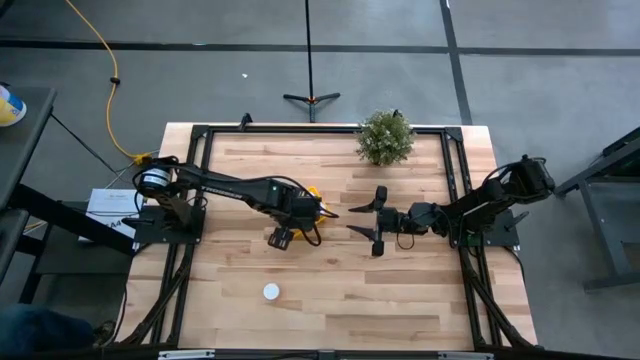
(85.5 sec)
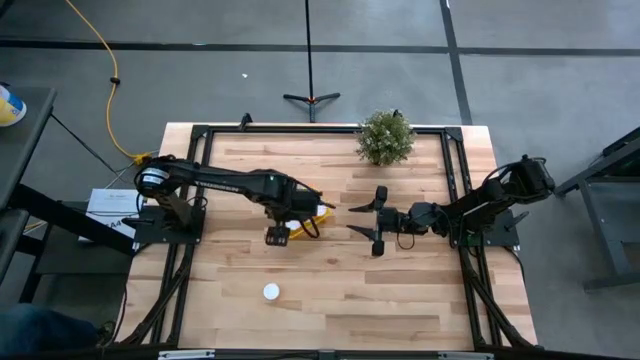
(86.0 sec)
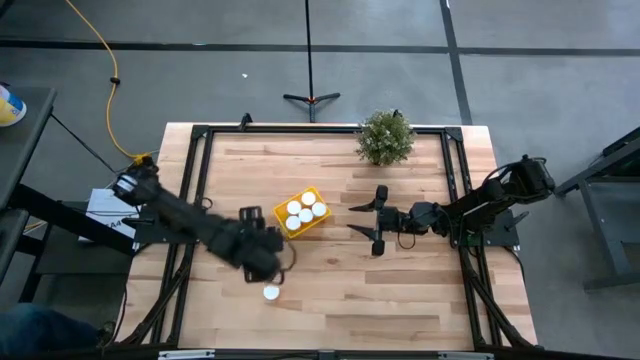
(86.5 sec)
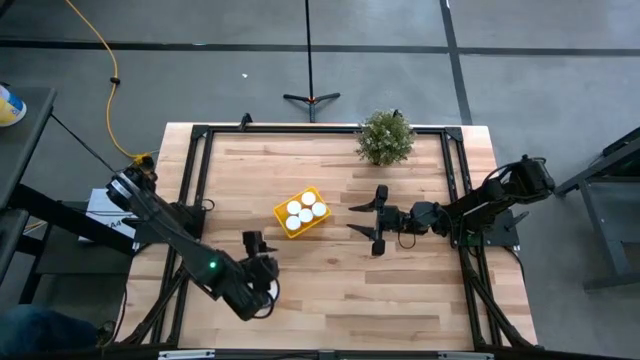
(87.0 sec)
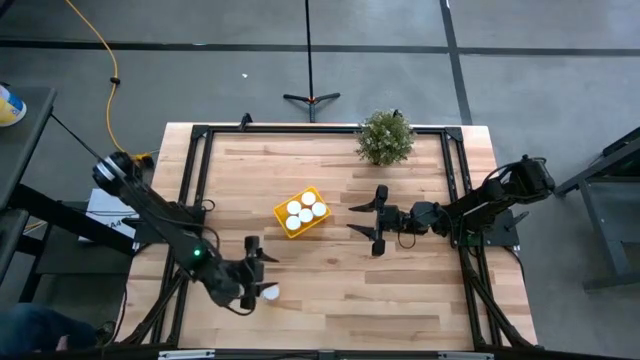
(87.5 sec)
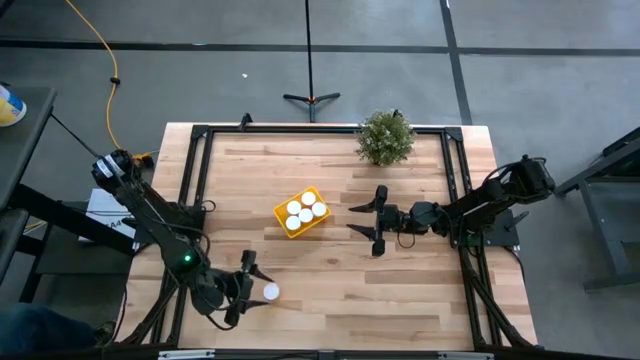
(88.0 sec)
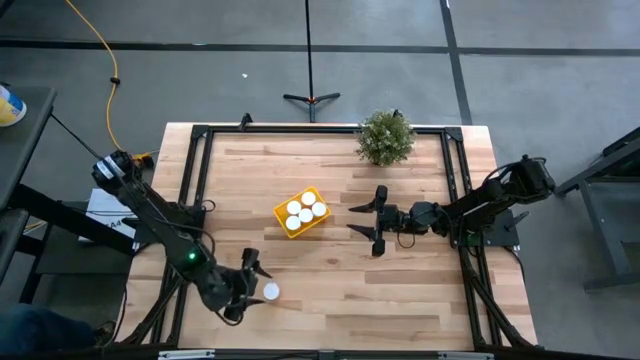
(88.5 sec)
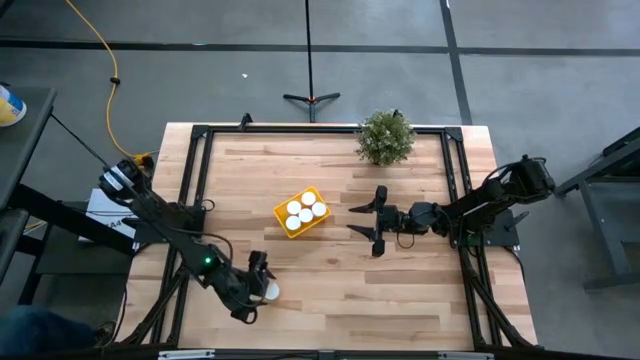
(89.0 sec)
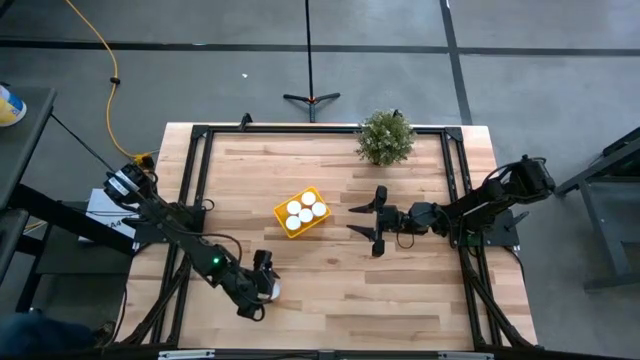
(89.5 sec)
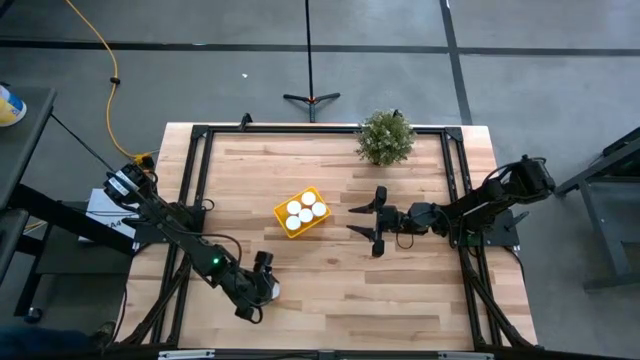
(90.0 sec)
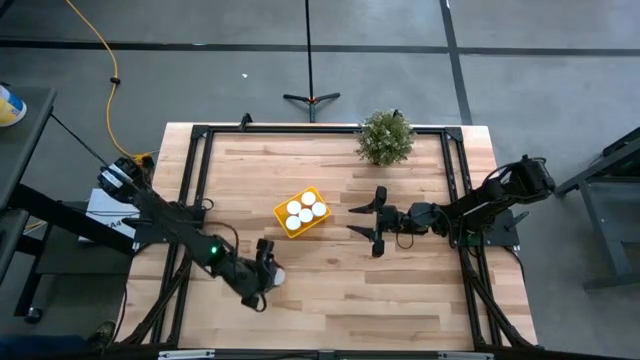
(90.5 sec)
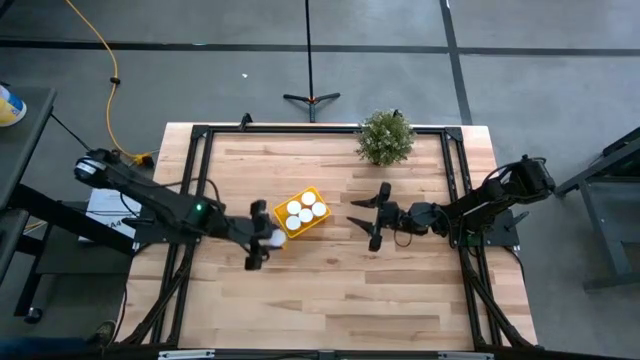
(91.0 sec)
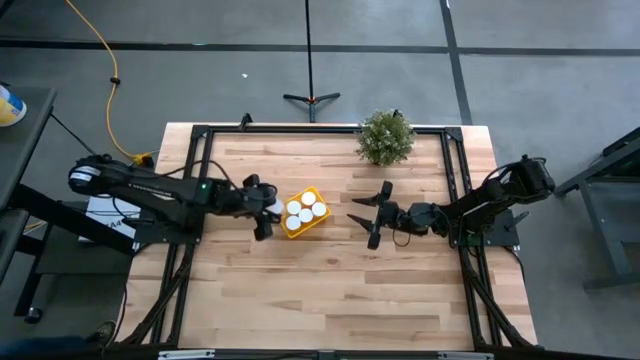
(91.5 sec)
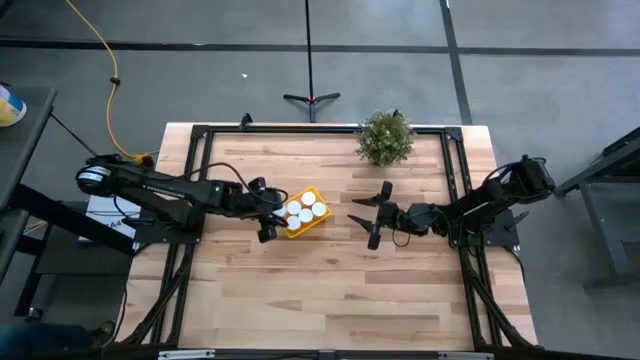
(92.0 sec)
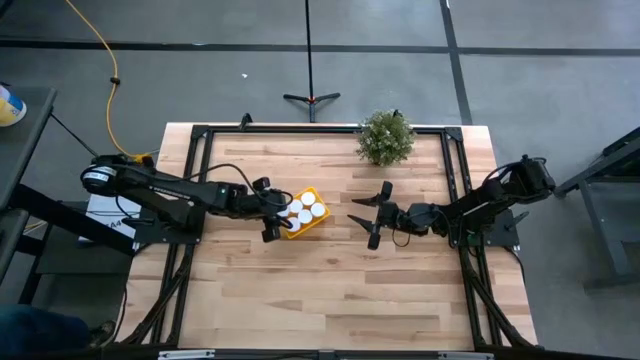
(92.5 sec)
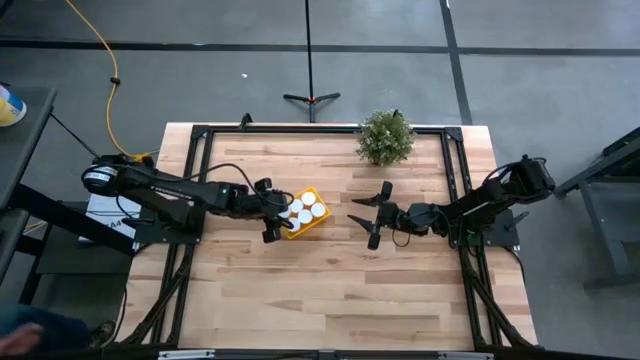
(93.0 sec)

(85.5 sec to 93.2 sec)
Task: Pick and place pill bottles into a basket
Put the yellow pill bottle into the bin

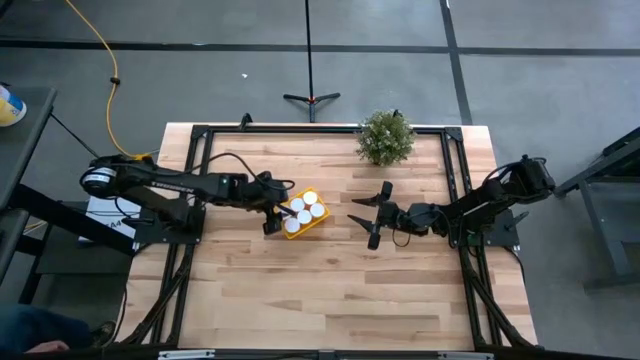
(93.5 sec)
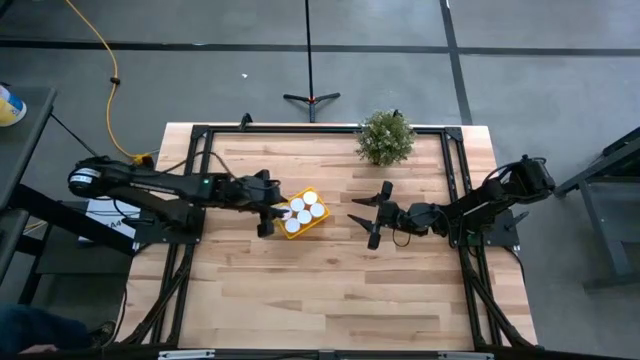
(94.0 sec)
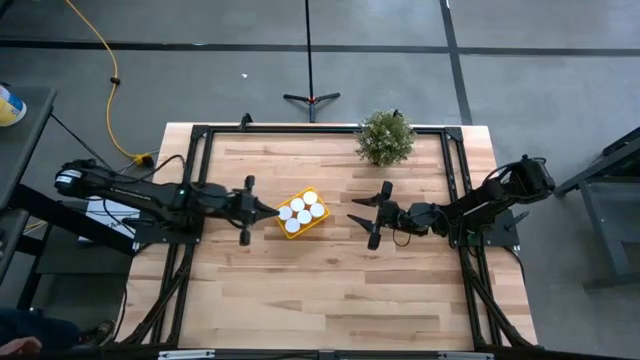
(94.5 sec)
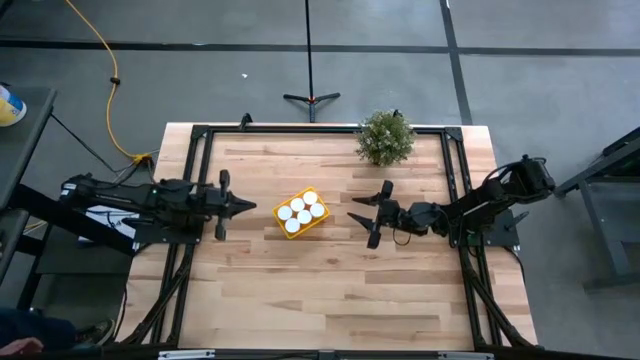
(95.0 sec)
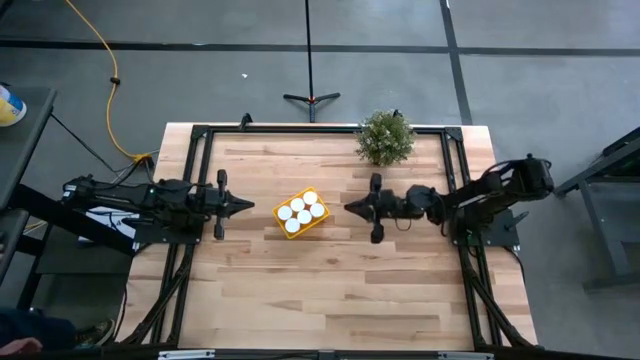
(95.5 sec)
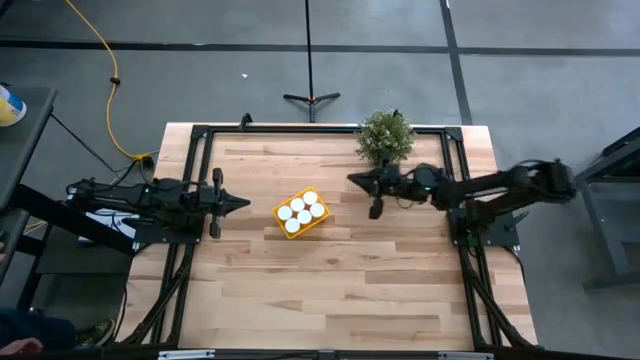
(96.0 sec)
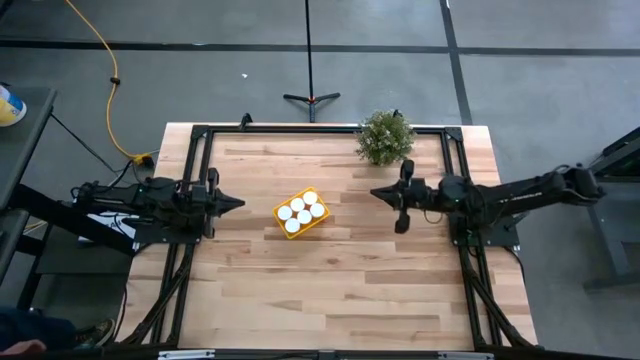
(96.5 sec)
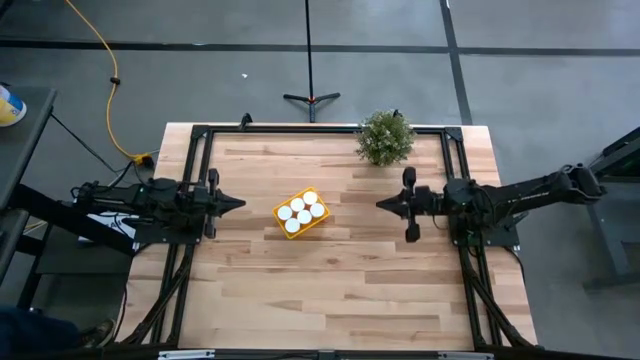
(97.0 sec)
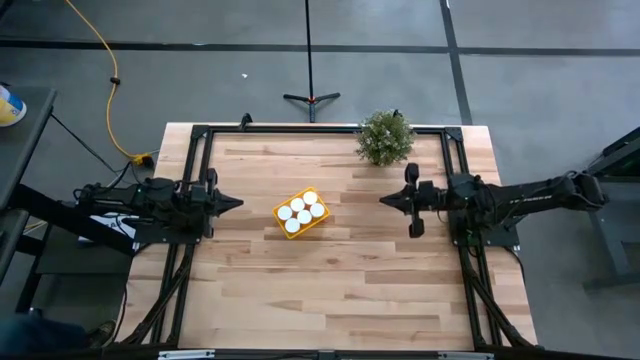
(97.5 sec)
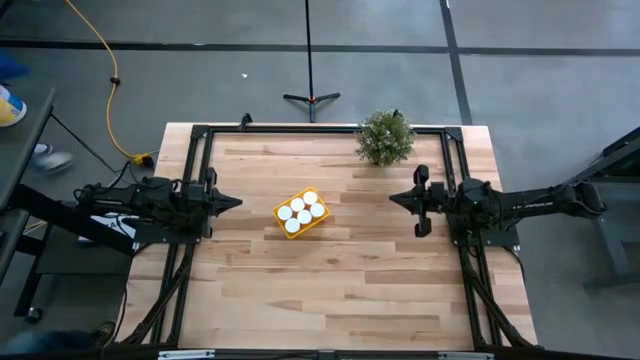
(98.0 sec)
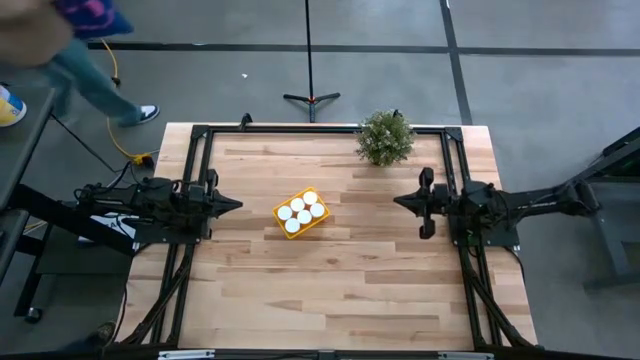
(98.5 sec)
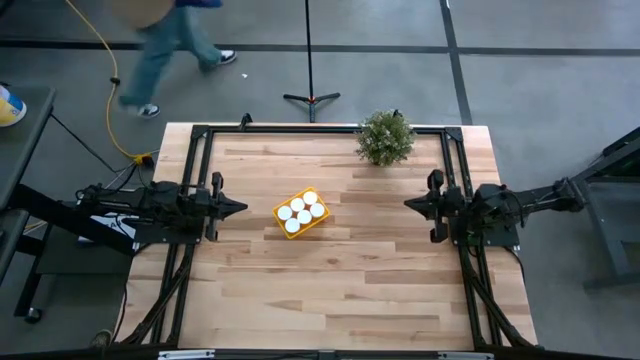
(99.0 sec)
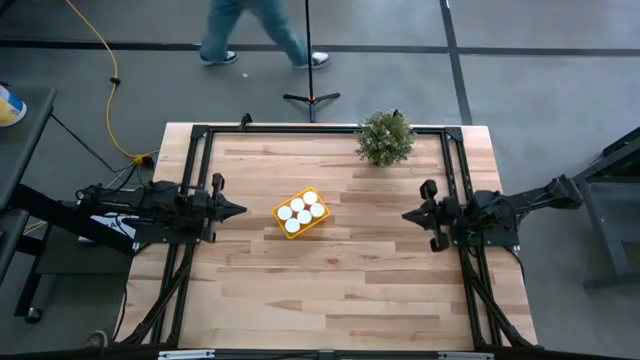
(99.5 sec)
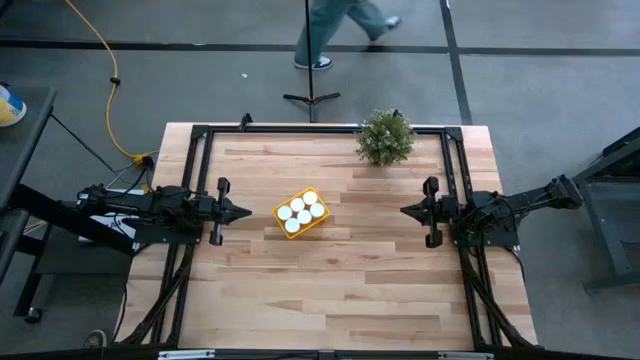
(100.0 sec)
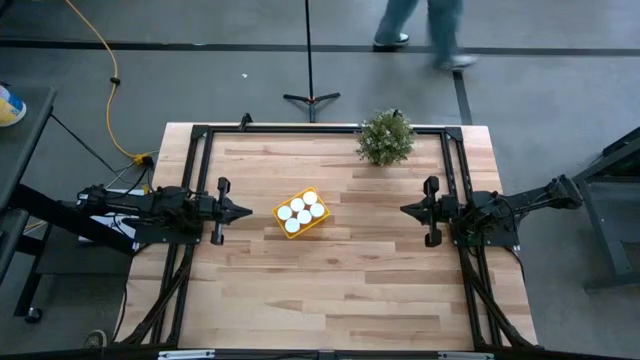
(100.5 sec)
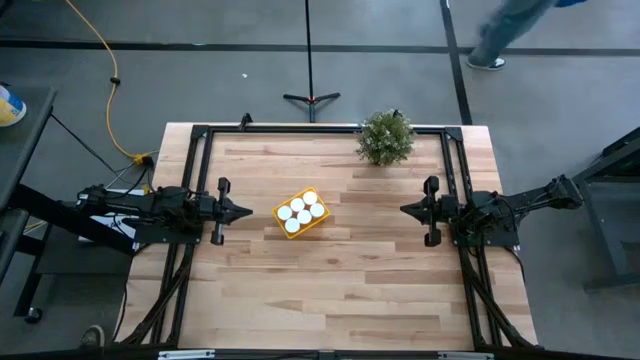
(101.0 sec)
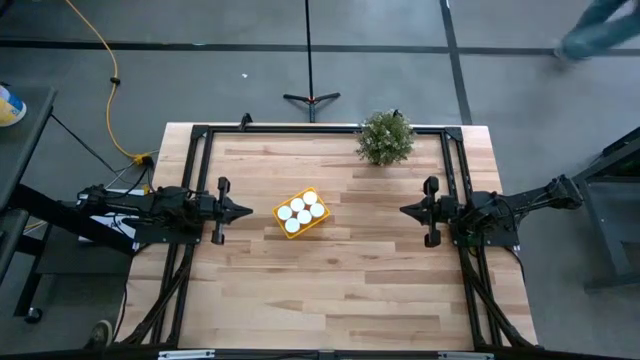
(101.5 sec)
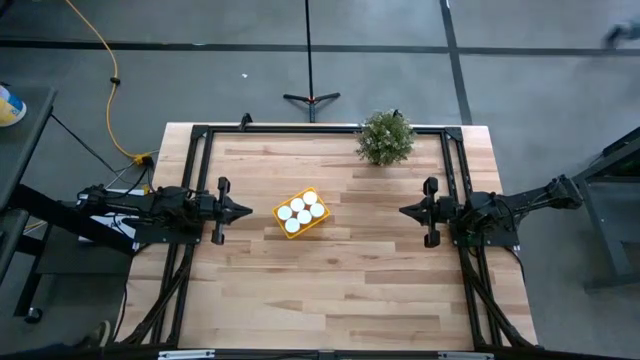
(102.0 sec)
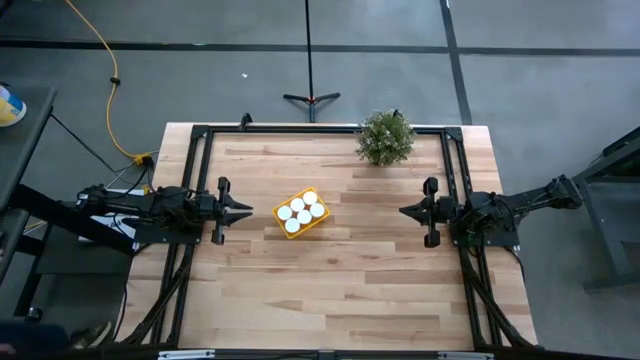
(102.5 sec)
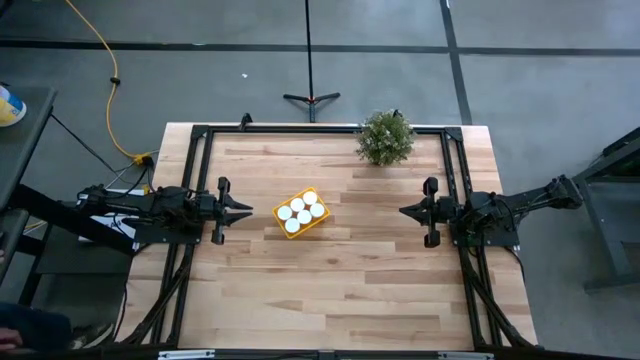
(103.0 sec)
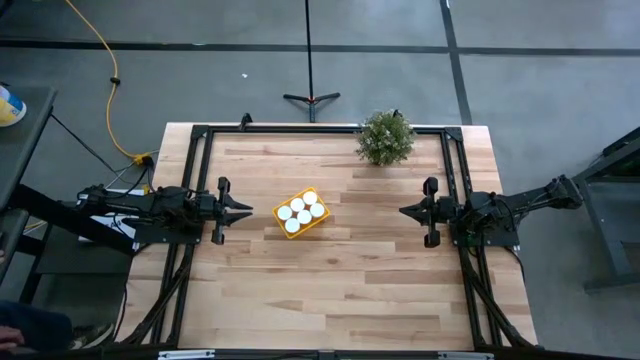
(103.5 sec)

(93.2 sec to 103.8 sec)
Return to Home Position
